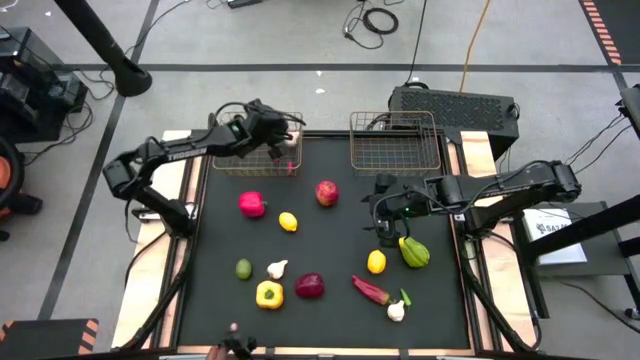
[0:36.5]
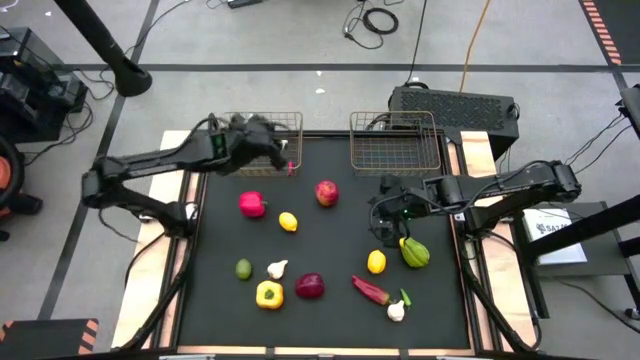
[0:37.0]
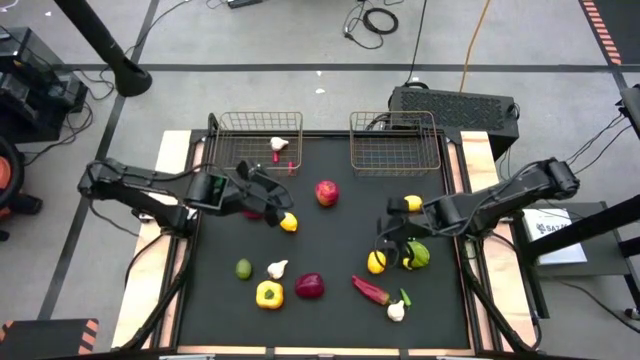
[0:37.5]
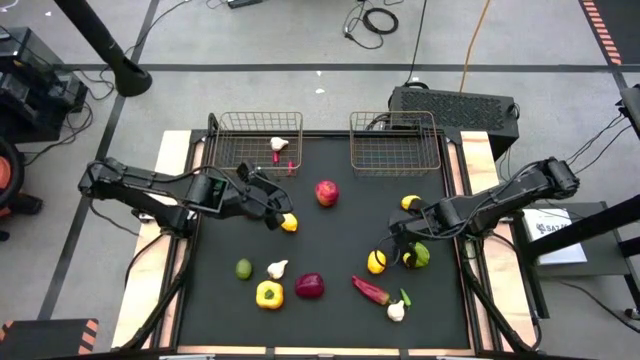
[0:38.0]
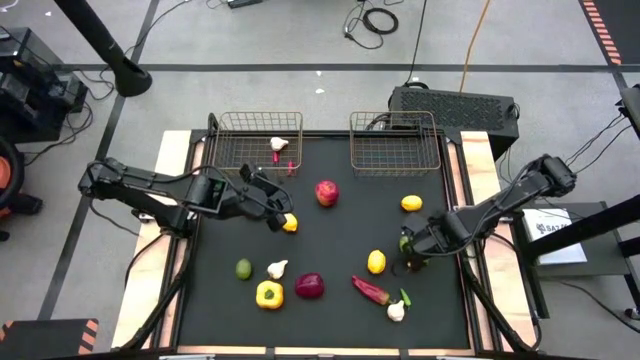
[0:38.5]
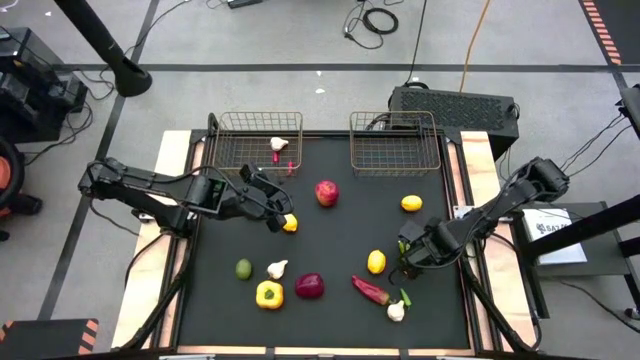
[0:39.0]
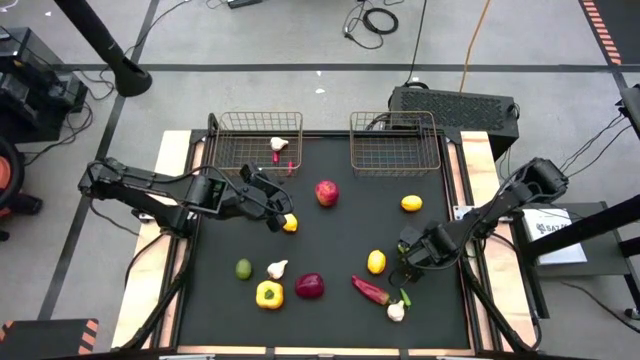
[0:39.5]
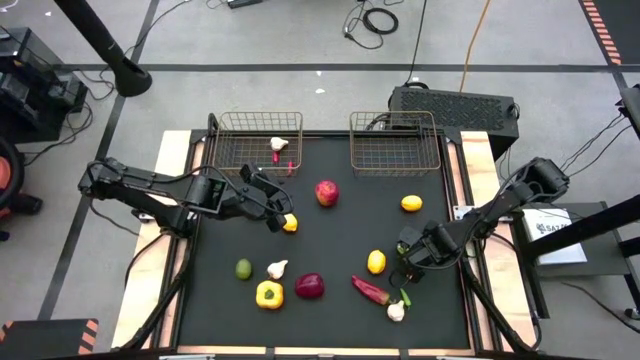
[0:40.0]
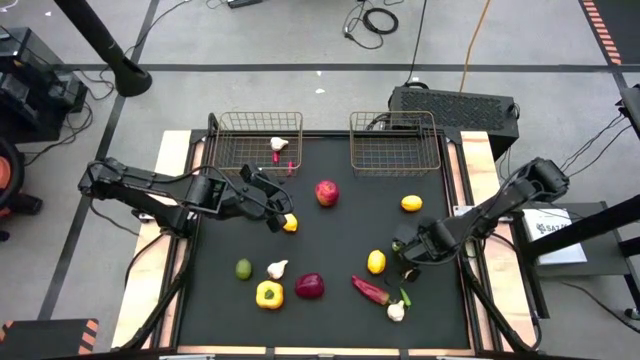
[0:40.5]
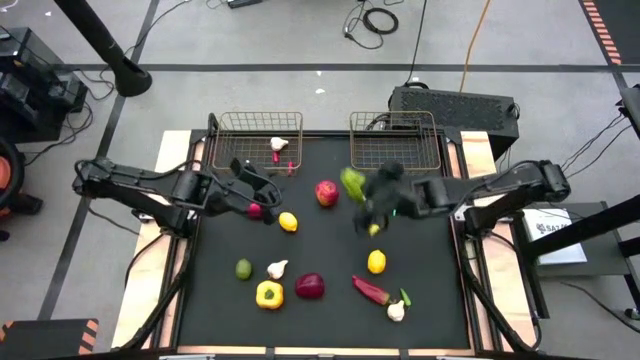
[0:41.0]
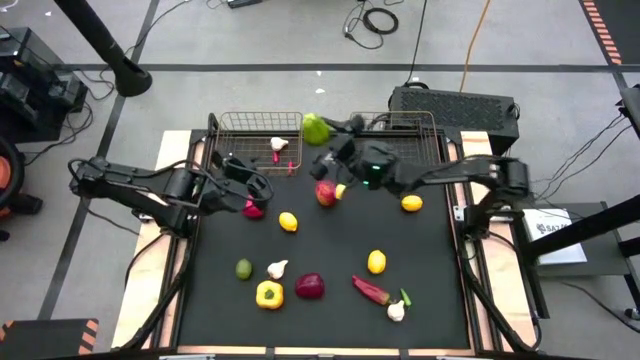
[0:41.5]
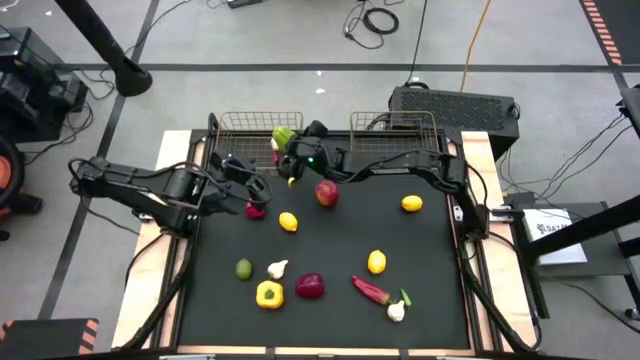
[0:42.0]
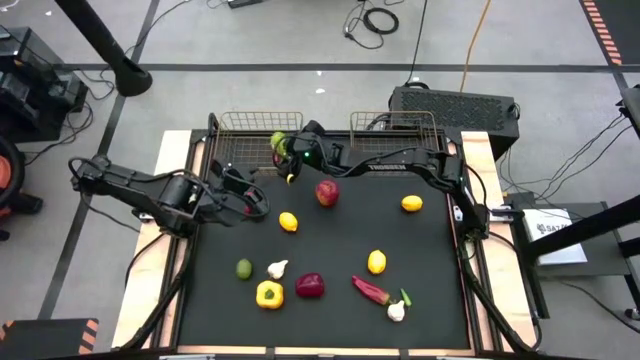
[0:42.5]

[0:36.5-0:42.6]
Task: Sort produce into baskets
Put the chayote into the left wire basket

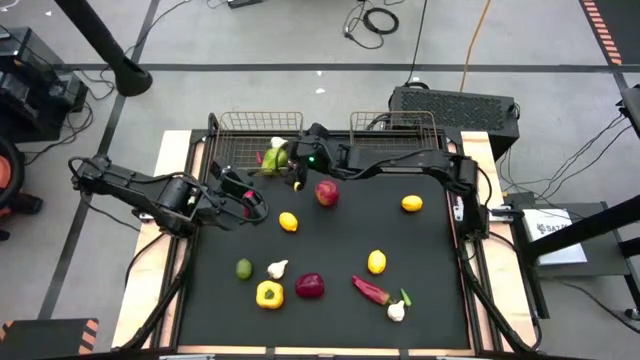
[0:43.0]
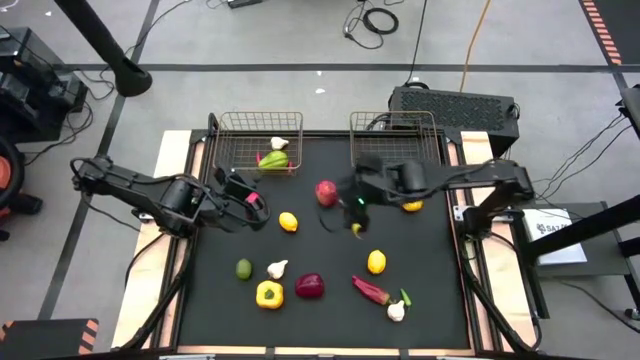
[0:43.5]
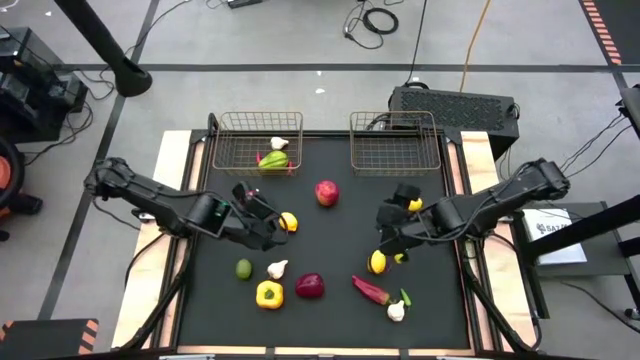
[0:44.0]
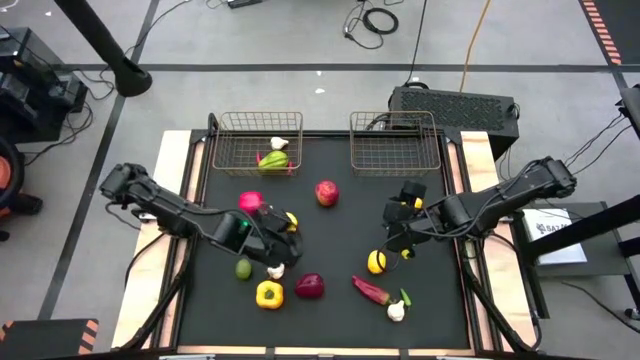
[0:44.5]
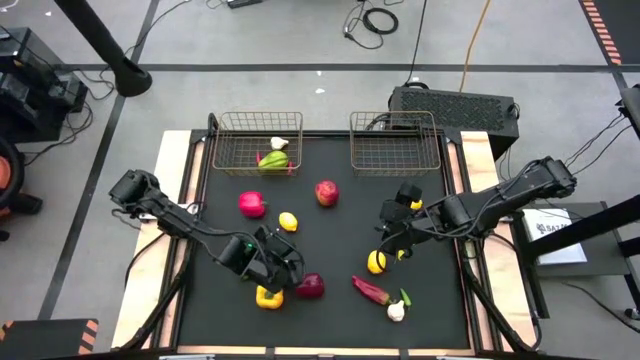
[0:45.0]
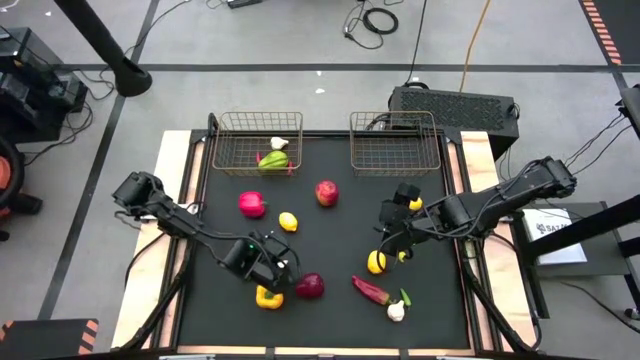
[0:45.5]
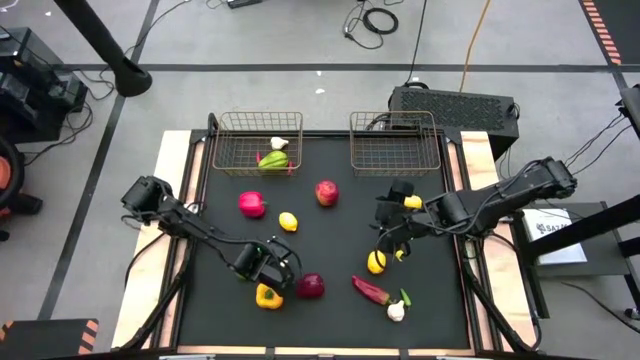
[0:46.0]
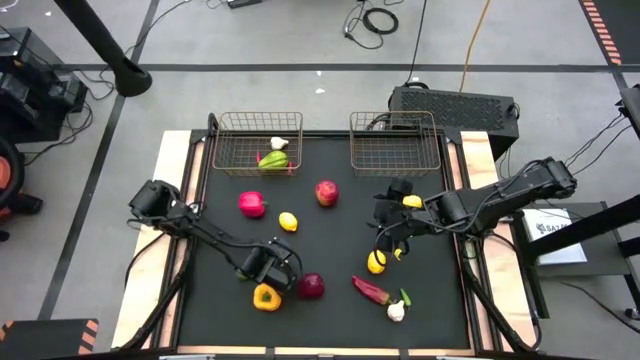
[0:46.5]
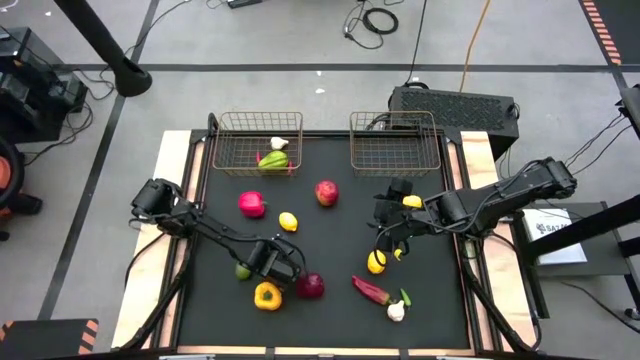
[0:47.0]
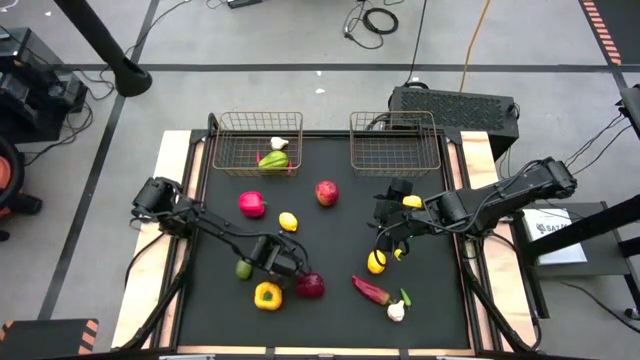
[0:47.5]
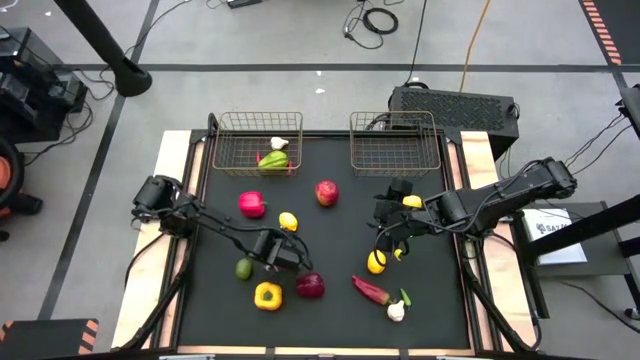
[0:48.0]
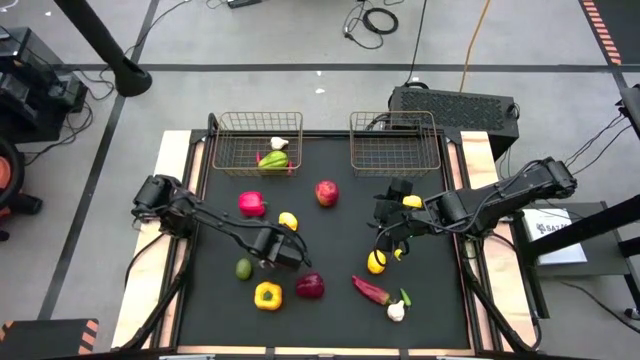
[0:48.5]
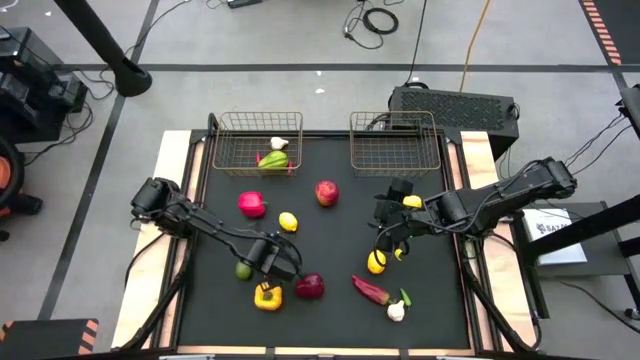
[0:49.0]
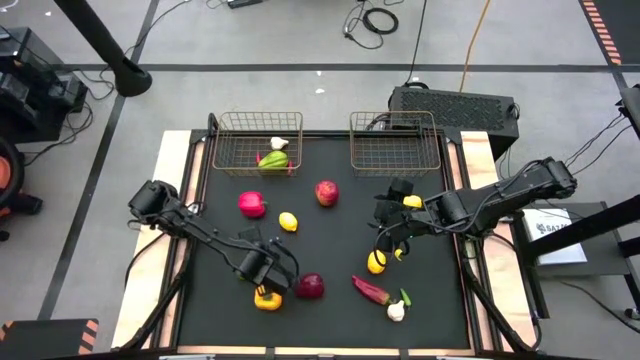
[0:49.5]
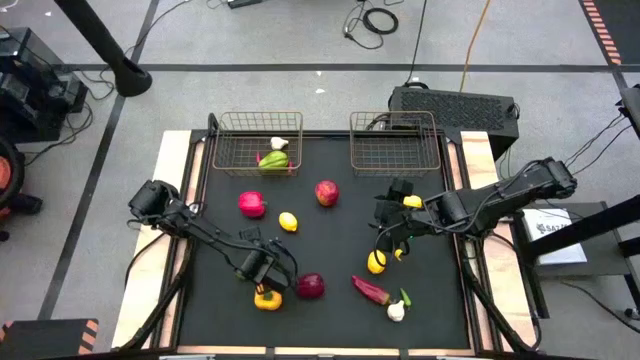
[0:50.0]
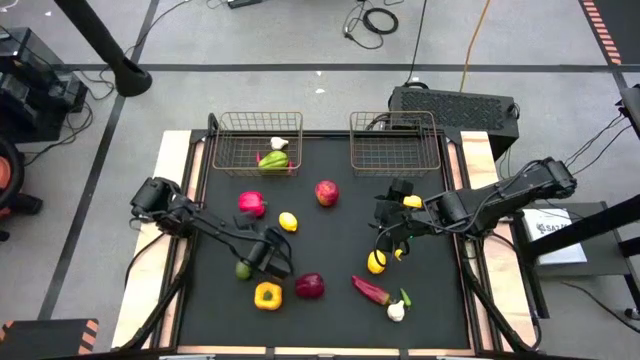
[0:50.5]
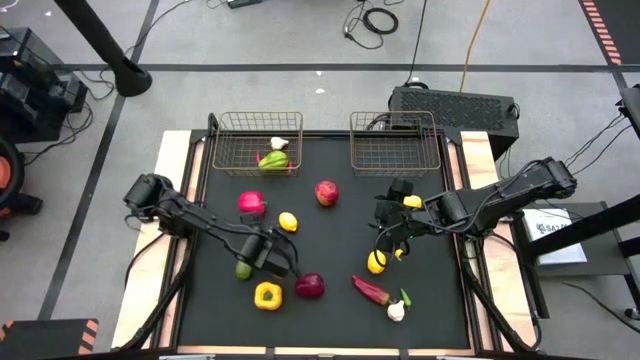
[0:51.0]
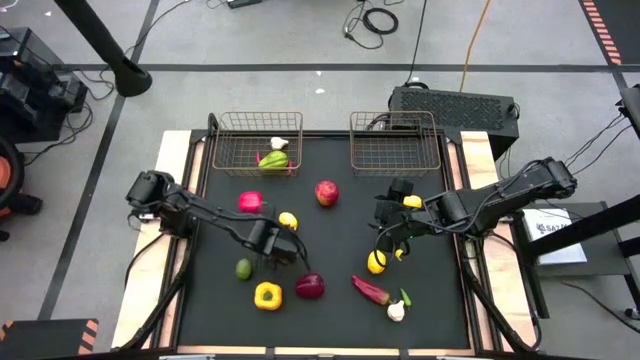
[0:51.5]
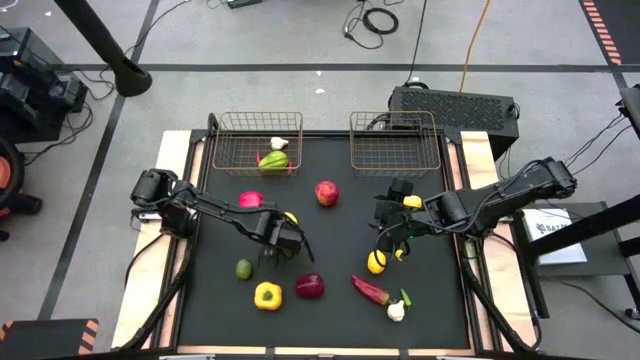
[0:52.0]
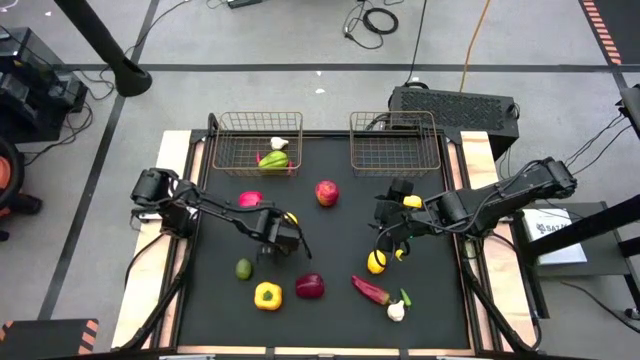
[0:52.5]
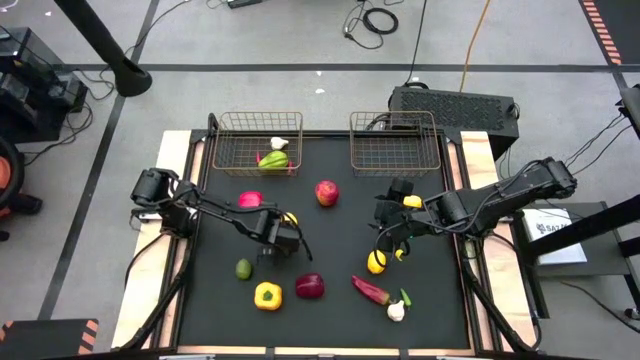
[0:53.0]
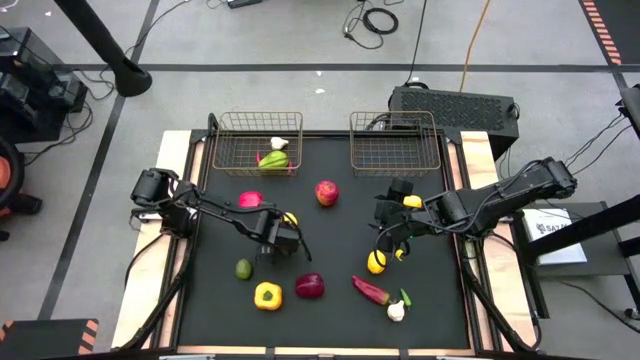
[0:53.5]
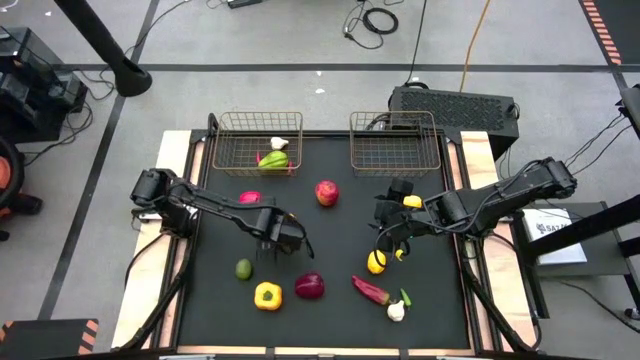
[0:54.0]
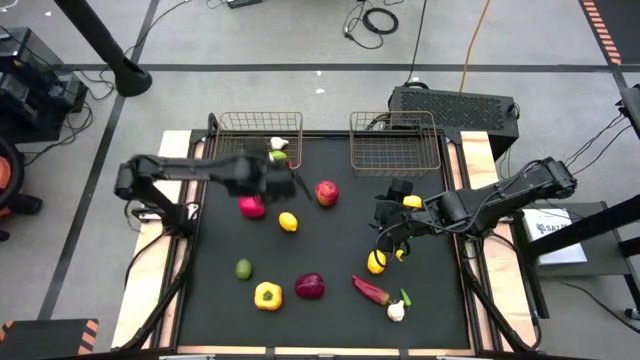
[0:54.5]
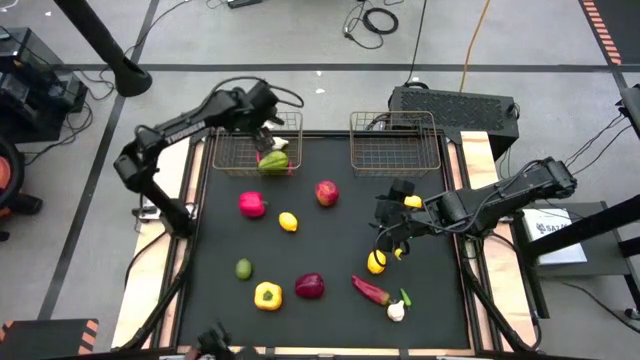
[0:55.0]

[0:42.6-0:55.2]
Put the left garlic into the left wire basket

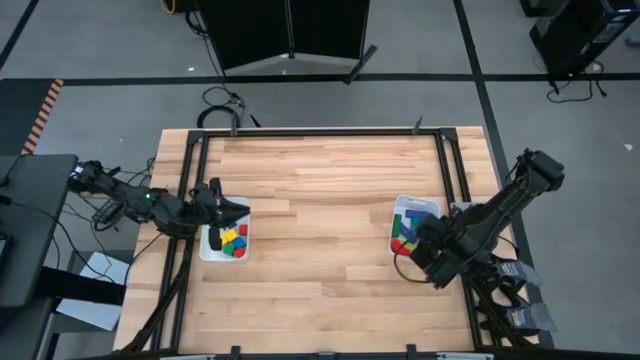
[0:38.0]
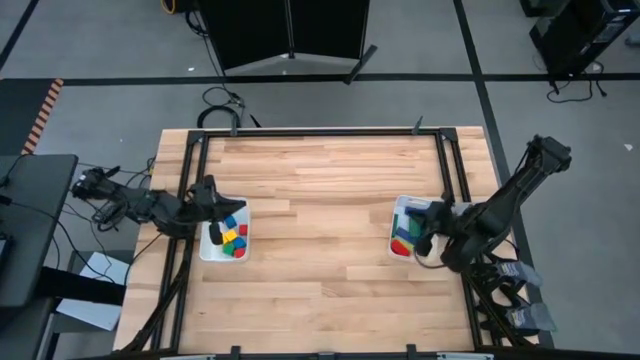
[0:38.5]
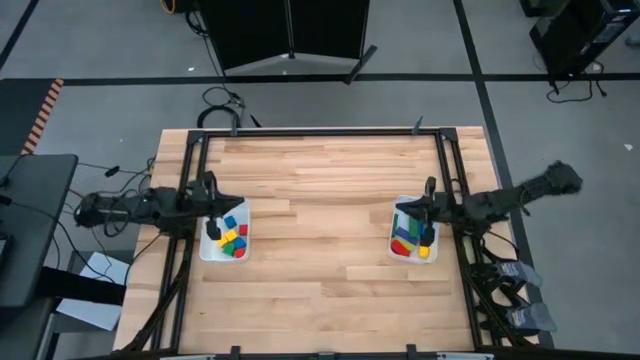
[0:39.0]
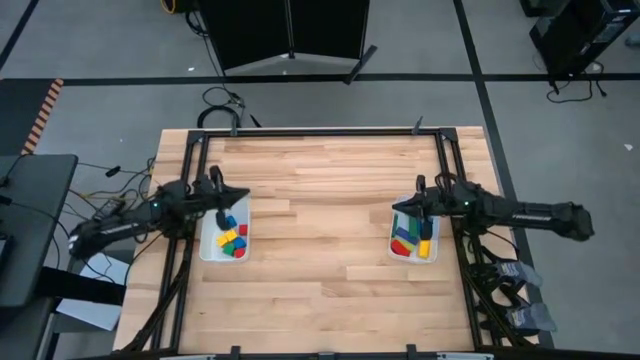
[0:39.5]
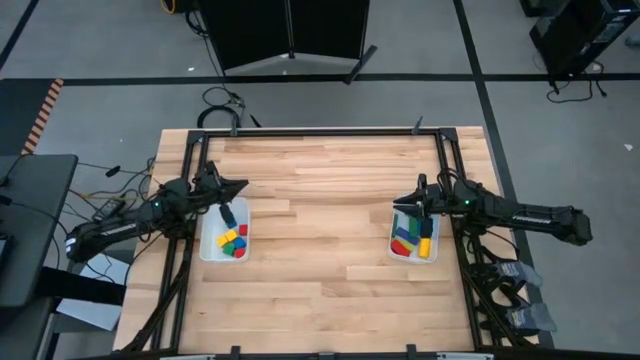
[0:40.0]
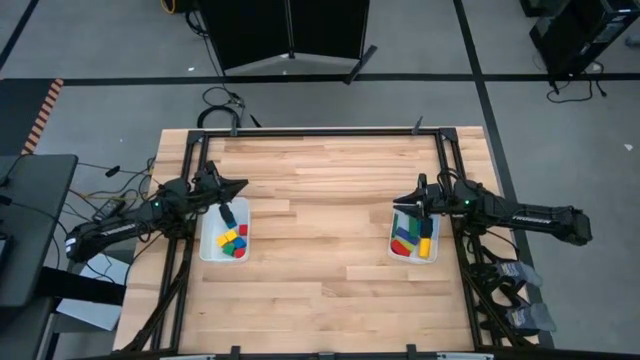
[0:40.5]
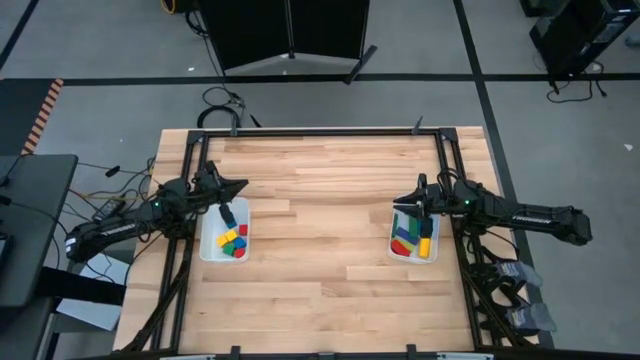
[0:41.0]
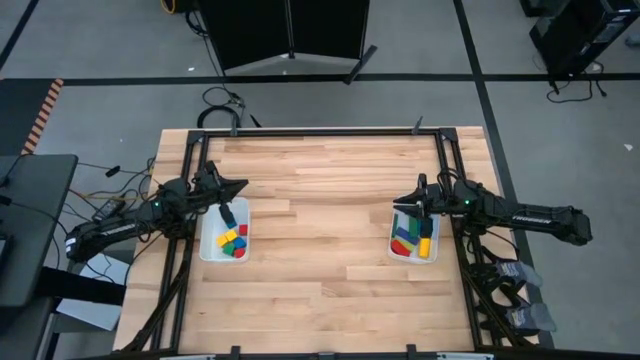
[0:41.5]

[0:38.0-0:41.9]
Task: Sort blocks by size
Return to Home Position
